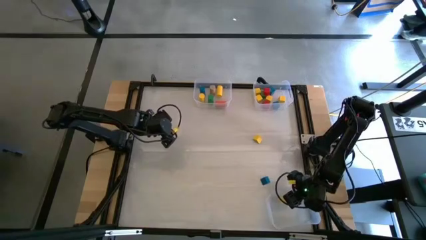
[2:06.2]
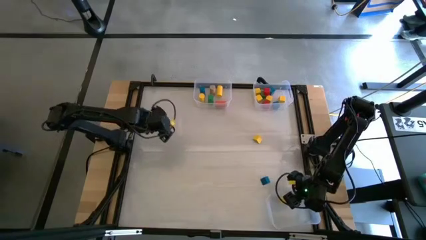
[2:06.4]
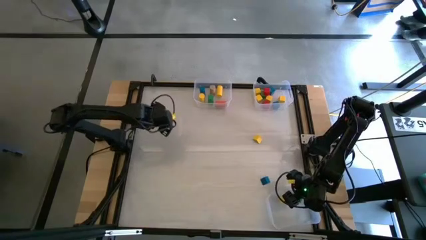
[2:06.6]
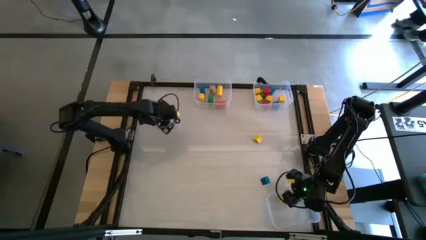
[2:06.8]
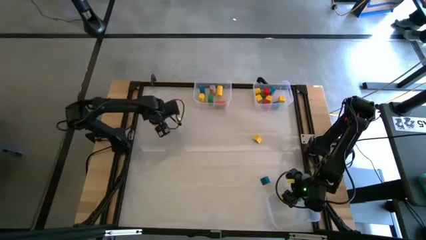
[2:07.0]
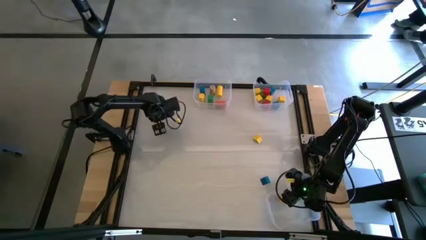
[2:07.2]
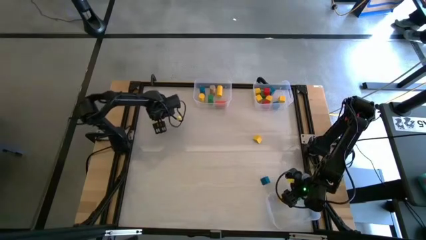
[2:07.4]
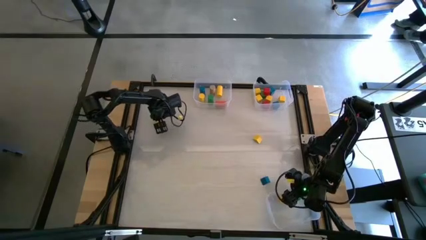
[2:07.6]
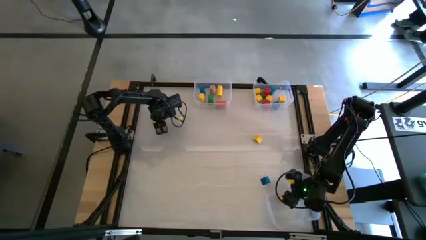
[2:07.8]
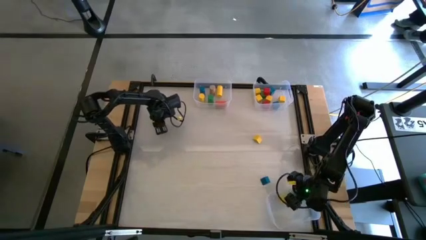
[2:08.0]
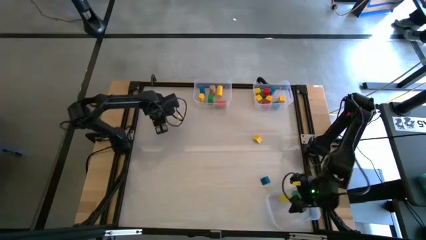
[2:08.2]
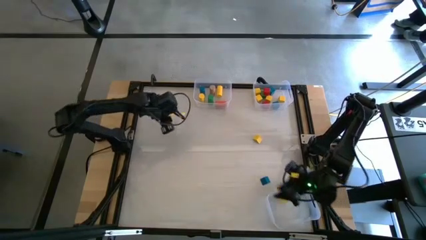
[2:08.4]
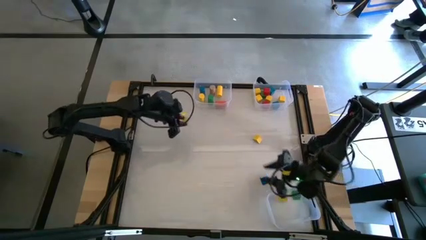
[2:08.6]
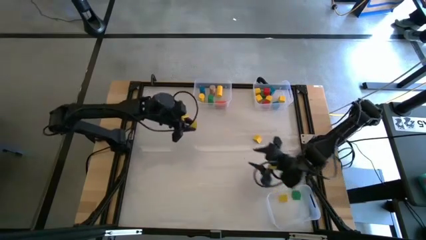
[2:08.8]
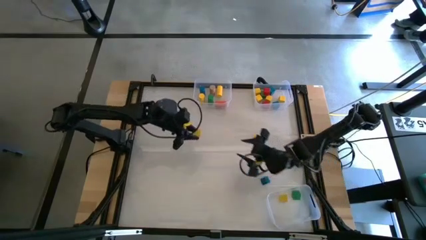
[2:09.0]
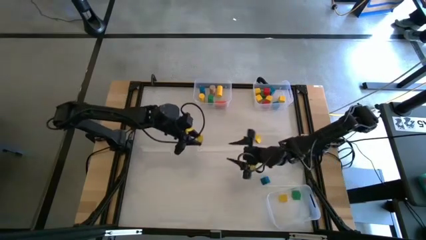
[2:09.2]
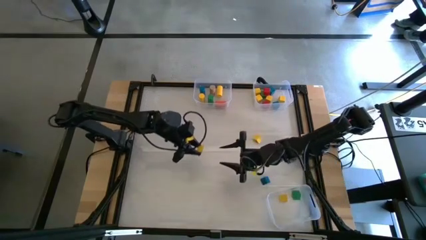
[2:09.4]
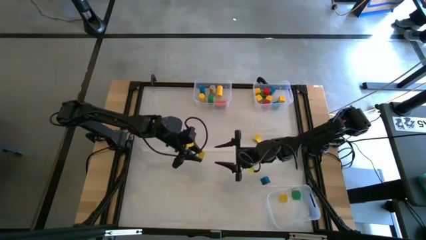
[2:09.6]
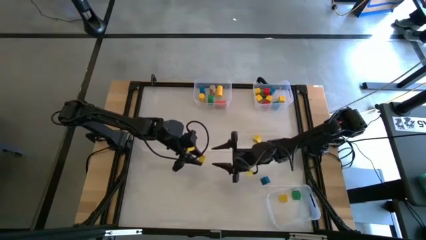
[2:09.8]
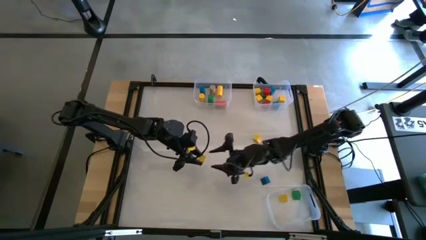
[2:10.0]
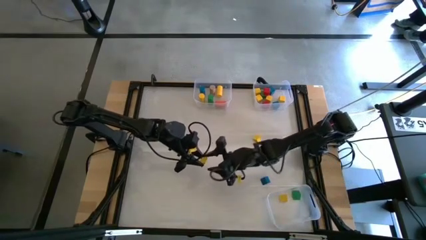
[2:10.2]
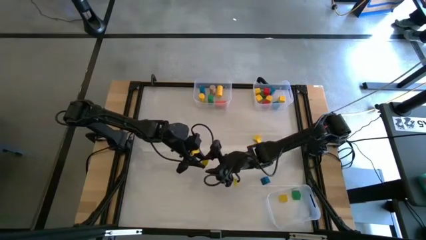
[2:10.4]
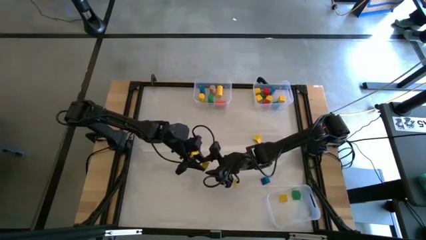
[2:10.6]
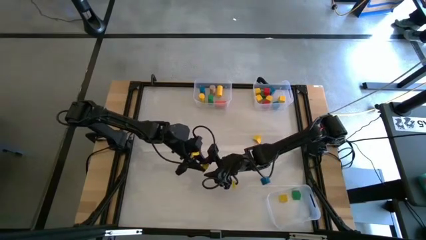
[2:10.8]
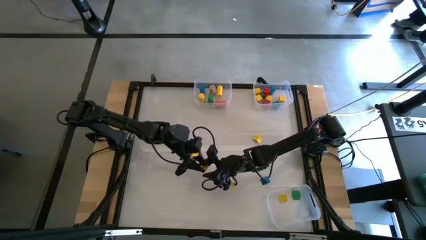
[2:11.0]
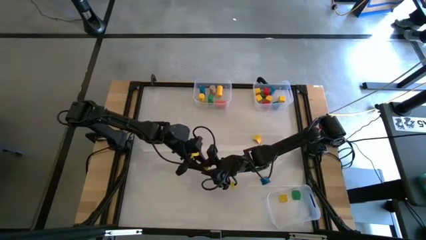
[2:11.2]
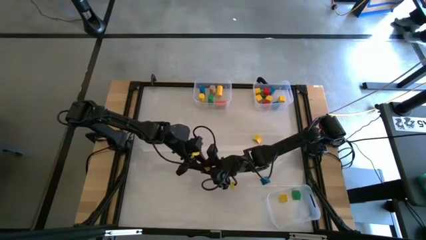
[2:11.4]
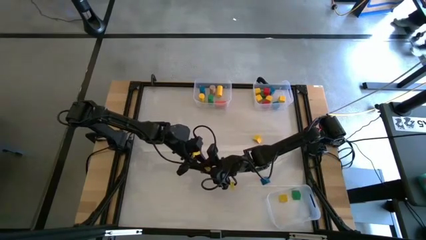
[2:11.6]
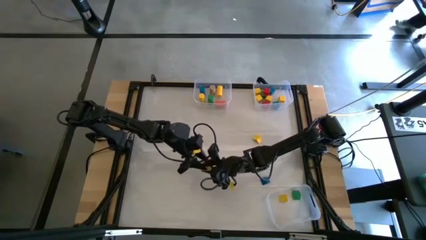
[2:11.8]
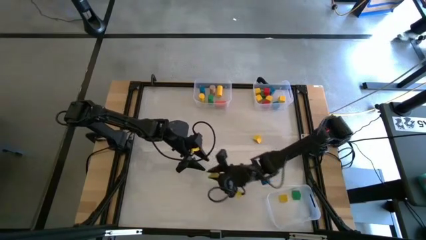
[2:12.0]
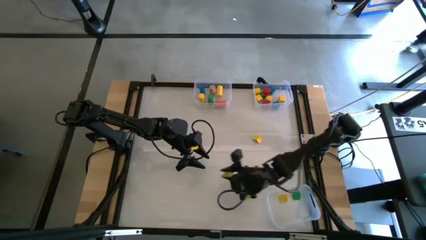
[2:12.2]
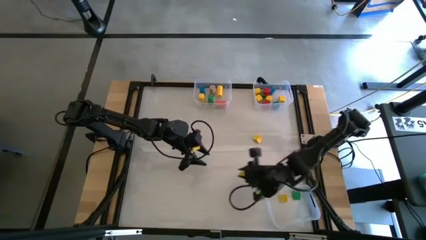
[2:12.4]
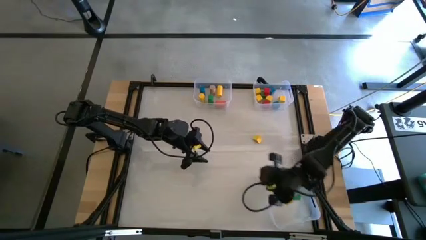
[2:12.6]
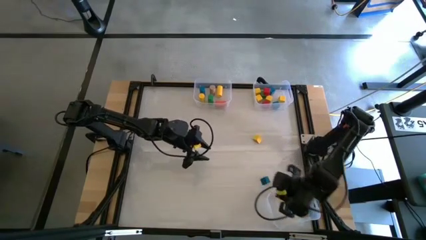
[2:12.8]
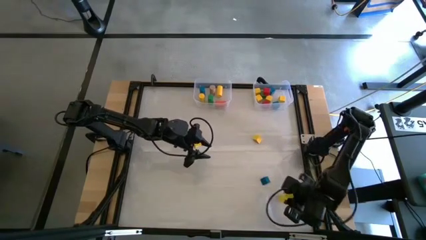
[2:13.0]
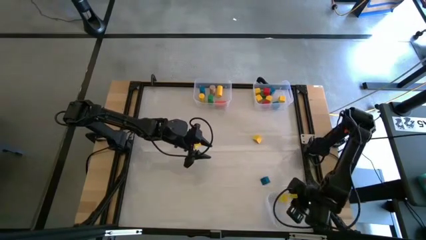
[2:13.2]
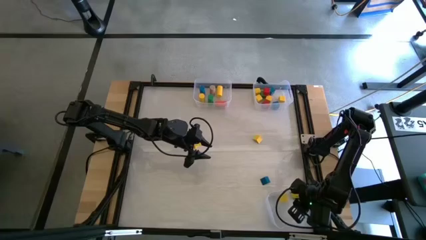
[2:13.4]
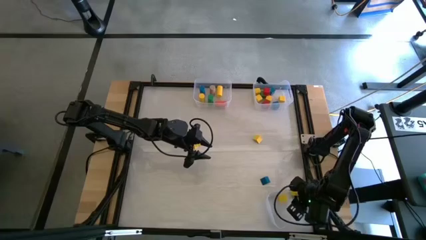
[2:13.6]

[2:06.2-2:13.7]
Task: Sort blocks by size
Put the yellow block into the bottom transparent bin

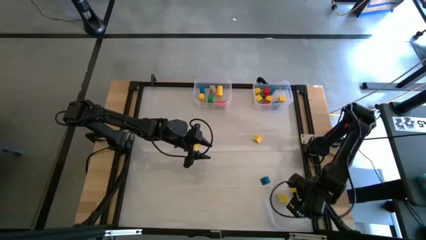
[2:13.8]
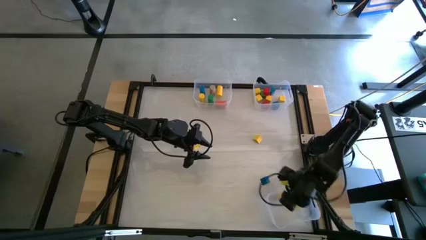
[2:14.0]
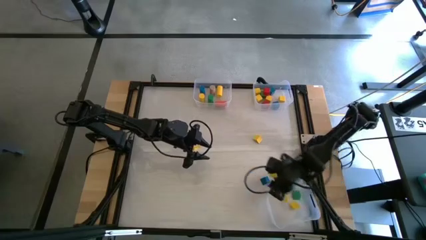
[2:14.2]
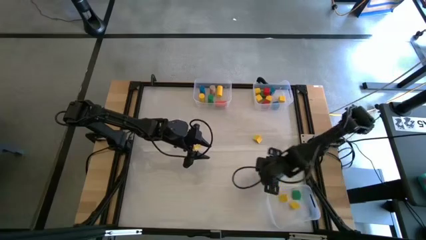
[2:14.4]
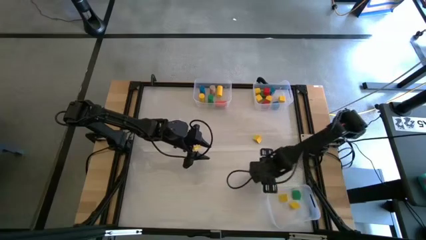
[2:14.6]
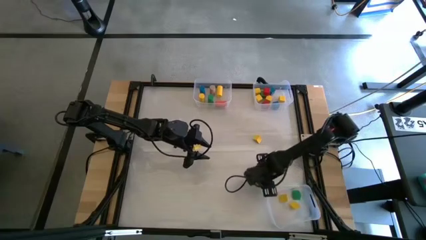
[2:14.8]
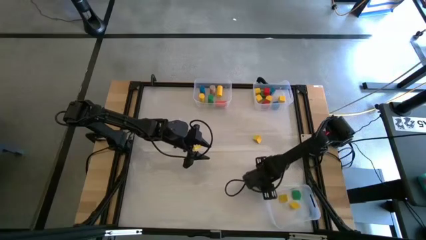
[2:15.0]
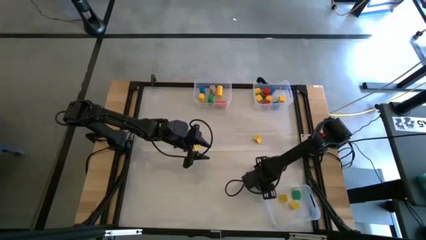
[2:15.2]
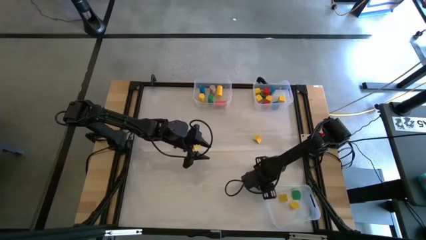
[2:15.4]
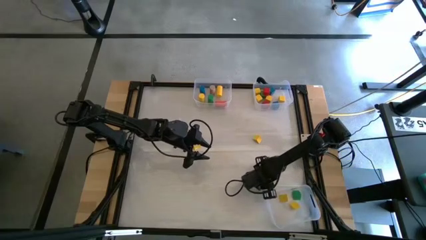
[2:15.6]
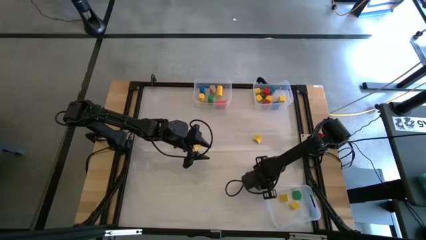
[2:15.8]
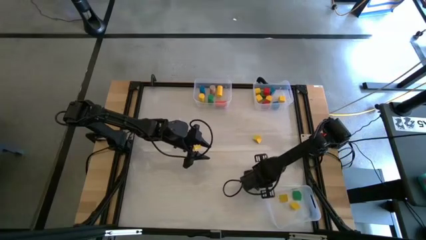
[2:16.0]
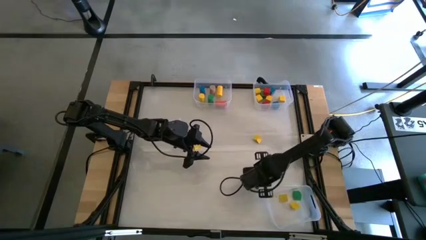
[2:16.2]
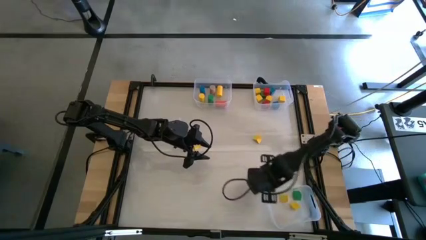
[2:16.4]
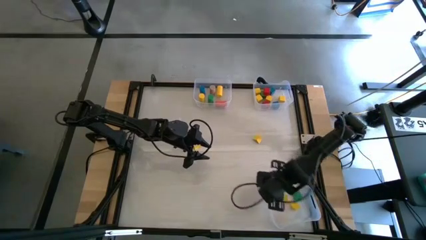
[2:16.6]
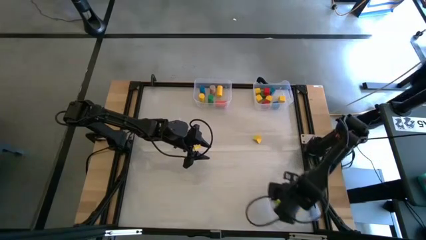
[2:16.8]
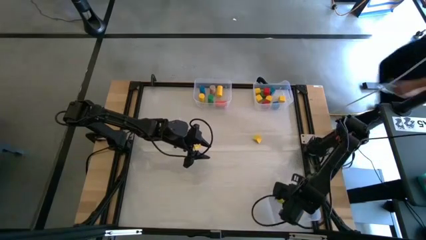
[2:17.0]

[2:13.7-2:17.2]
Put the blue triangle block into the bottom transparent bin

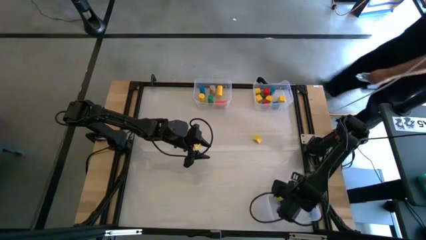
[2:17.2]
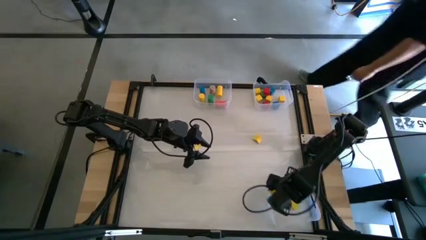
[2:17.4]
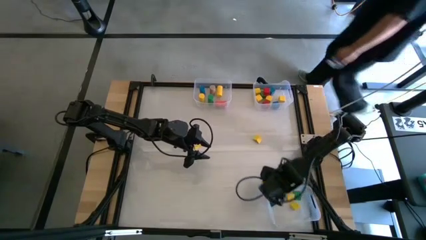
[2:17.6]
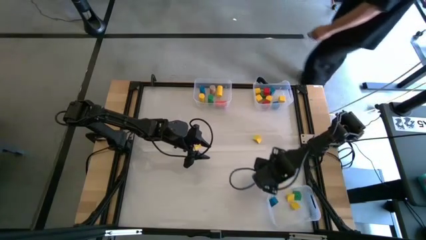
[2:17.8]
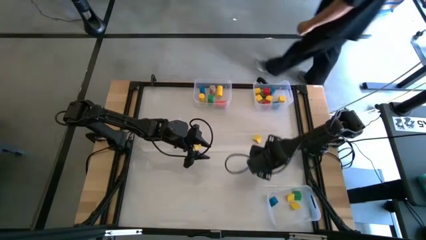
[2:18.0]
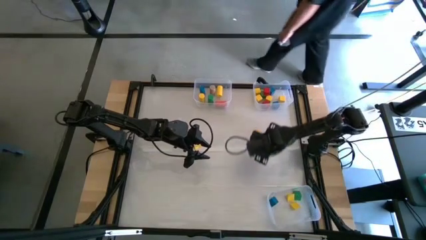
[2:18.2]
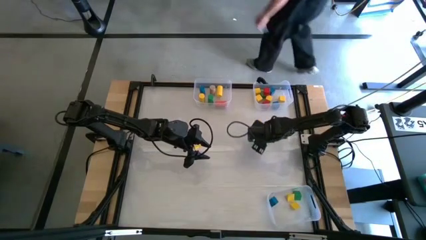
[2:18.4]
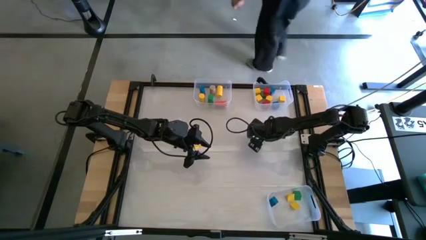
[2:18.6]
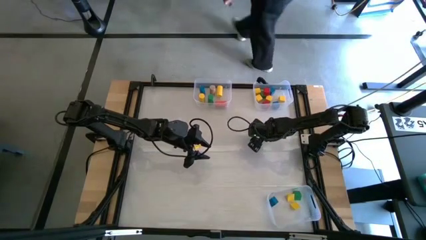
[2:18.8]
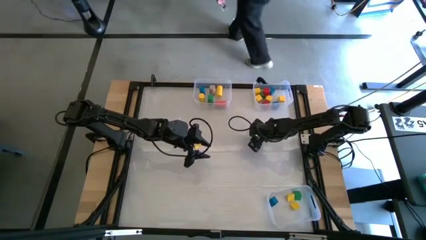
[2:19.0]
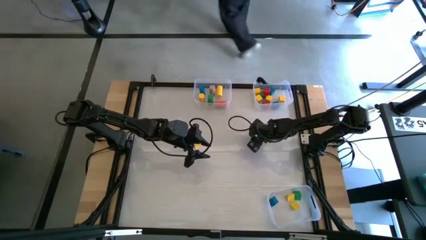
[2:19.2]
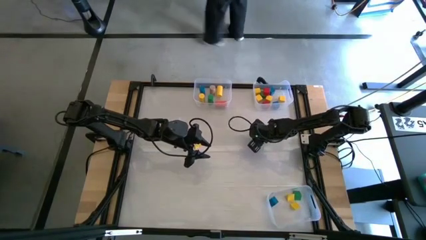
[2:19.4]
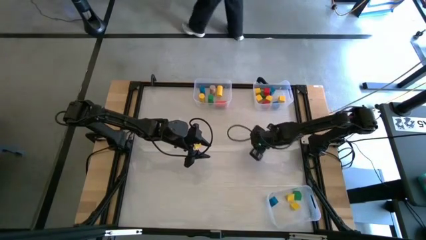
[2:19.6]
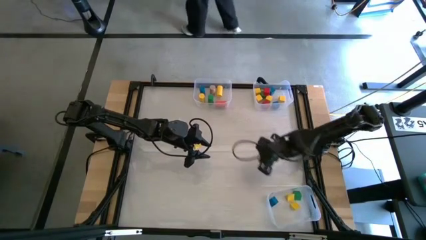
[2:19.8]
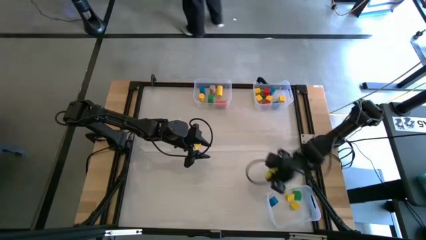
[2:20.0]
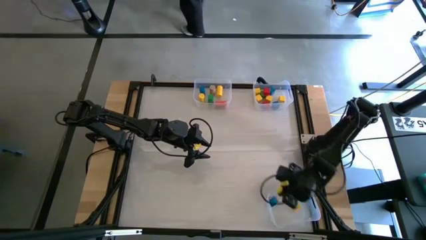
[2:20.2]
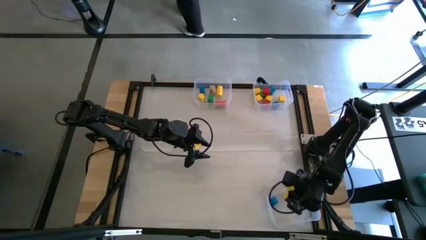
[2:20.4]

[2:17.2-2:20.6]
Put the yellow triangle block into the bottom transparent bin
